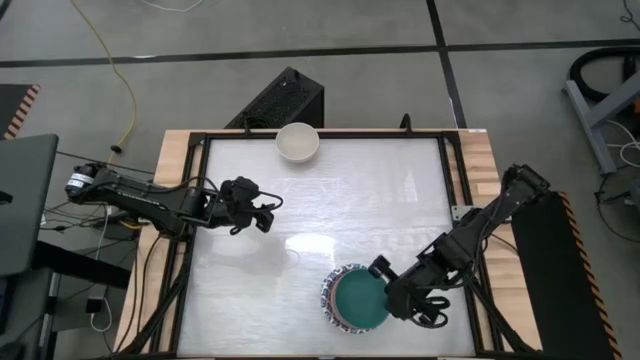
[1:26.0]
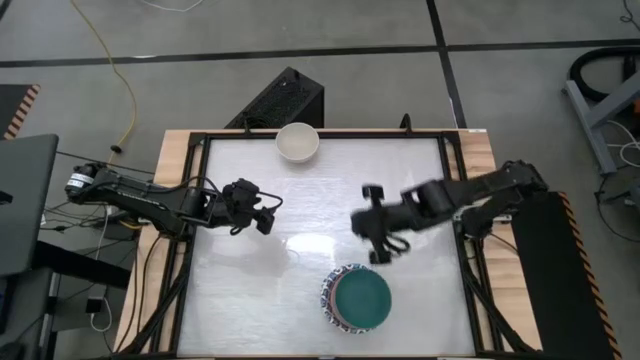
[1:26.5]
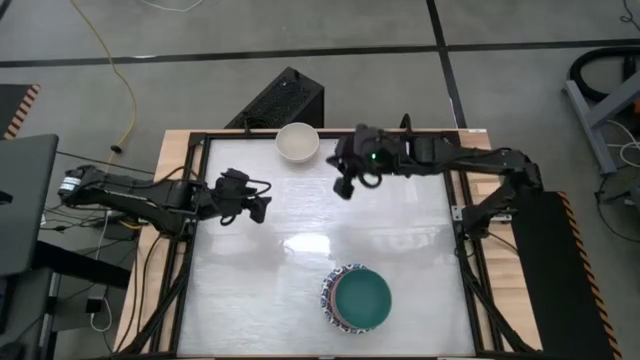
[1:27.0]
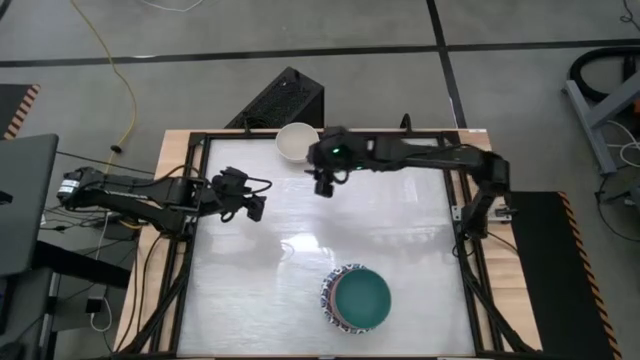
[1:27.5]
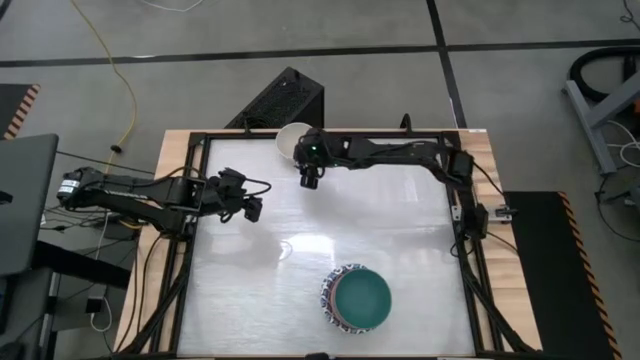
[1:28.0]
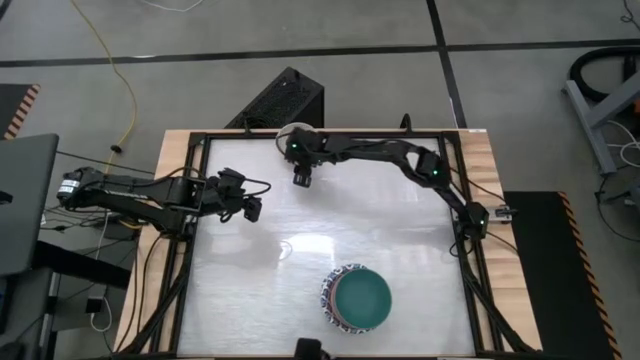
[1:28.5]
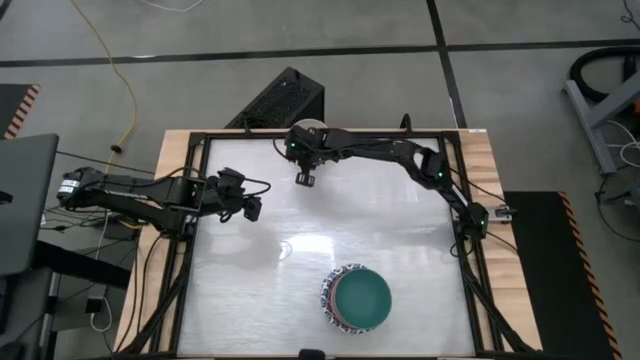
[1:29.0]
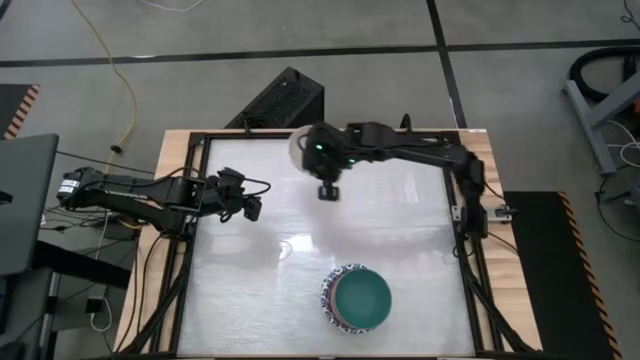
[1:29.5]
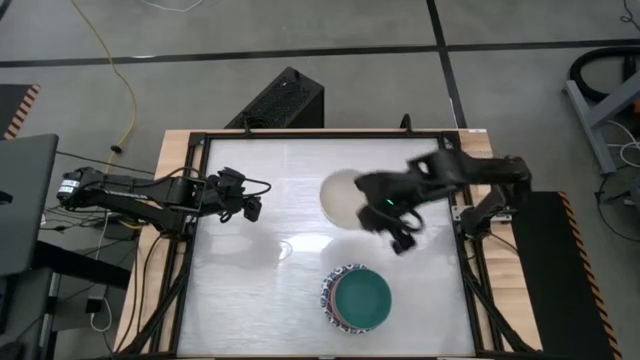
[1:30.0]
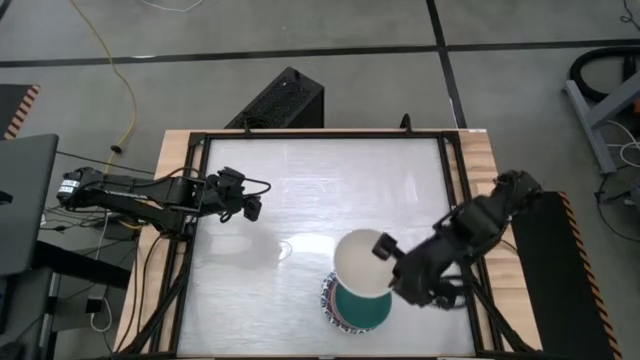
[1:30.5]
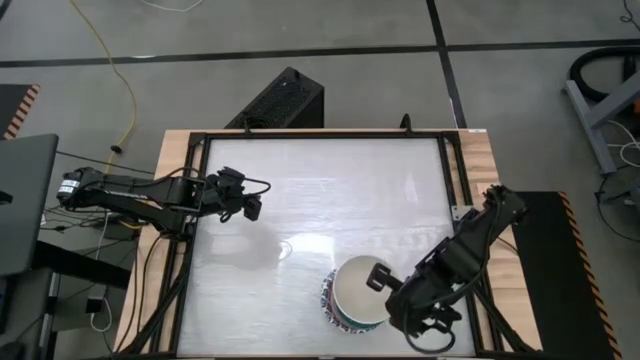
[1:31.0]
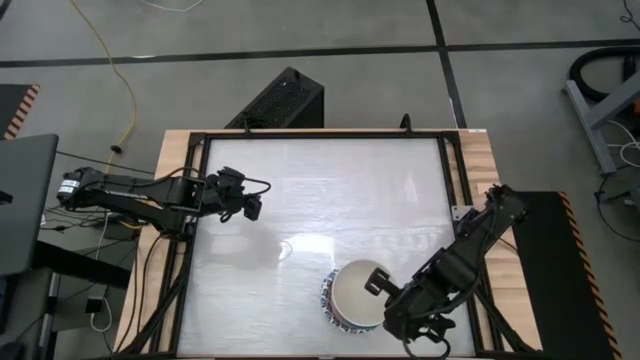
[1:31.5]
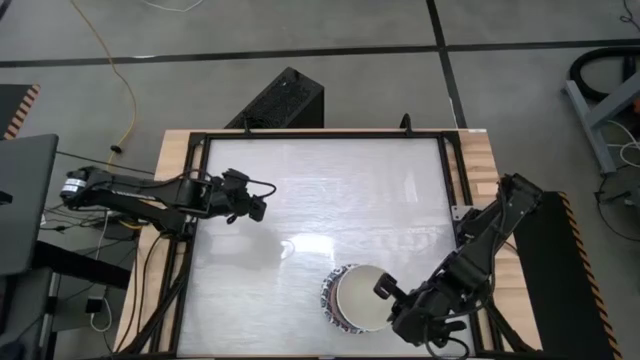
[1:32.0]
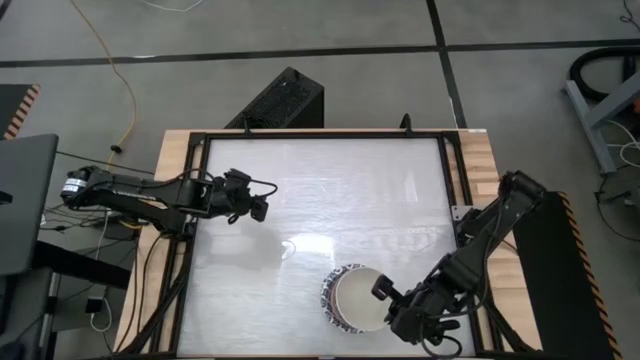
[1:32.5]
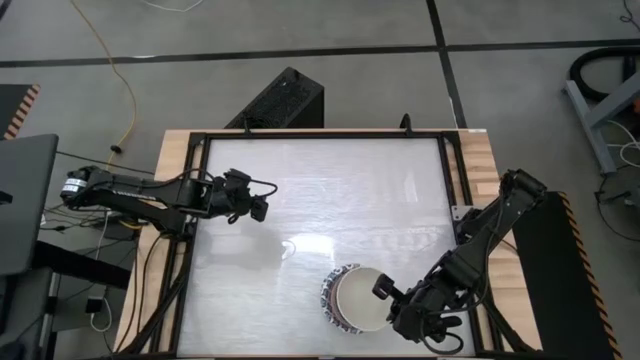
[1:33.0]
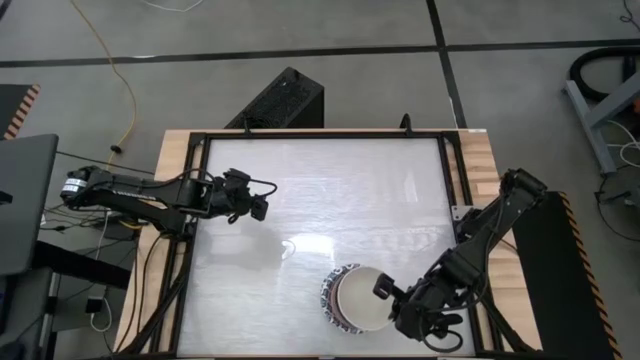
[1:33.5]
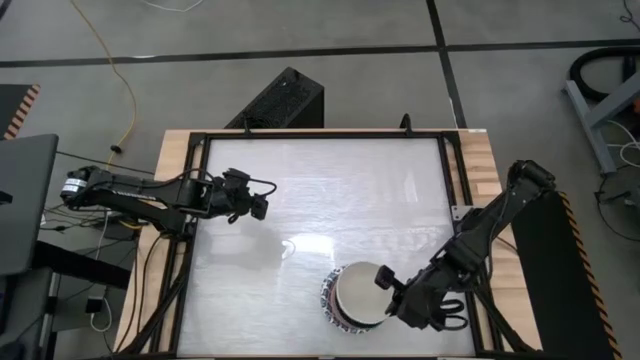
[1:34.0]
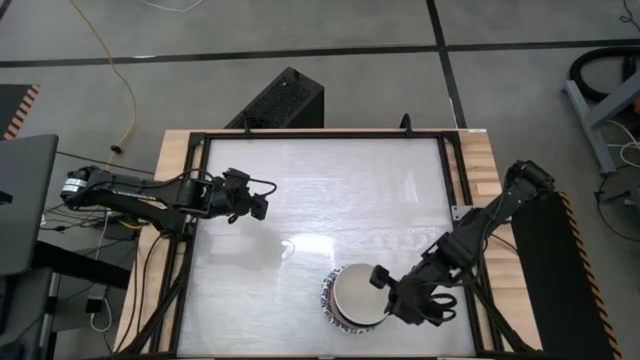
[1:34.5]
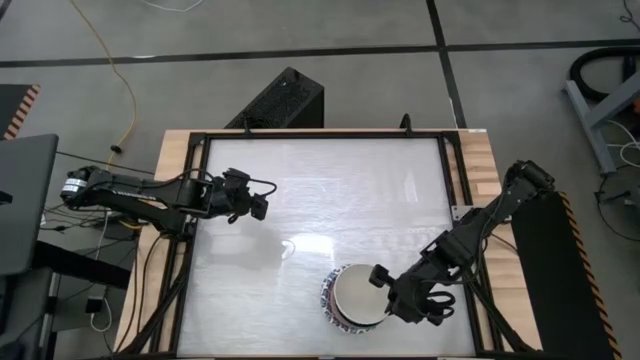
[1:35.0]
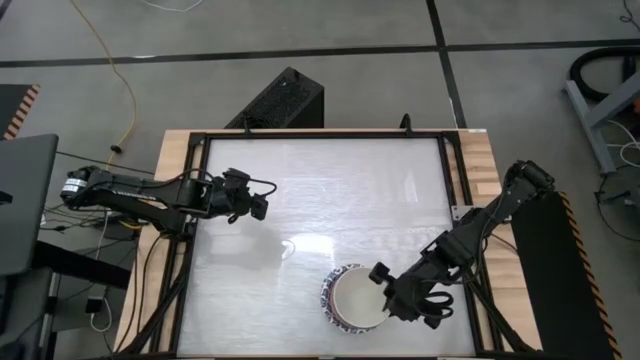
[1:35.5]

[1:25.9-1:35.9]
Stack the white bowl on top of the green bowl

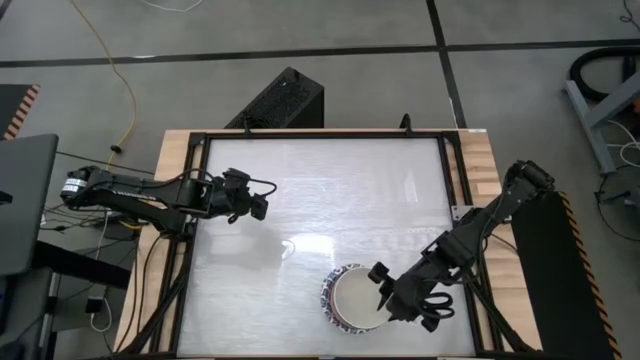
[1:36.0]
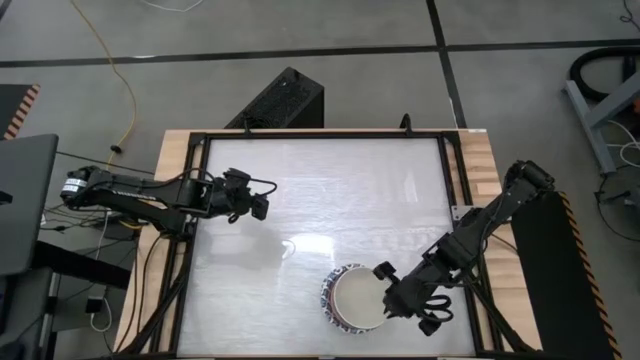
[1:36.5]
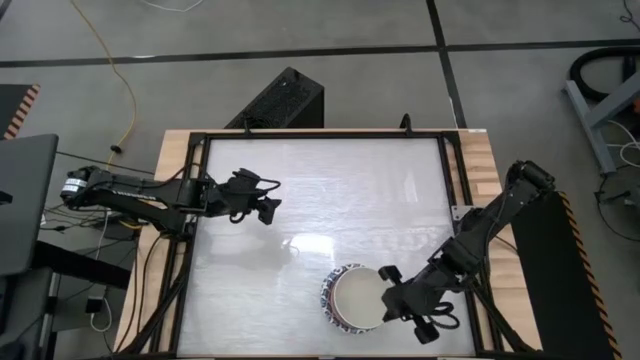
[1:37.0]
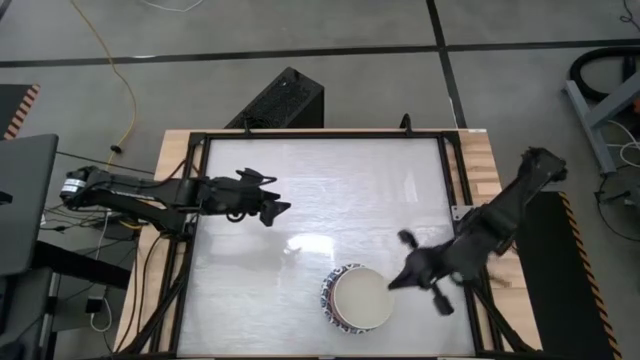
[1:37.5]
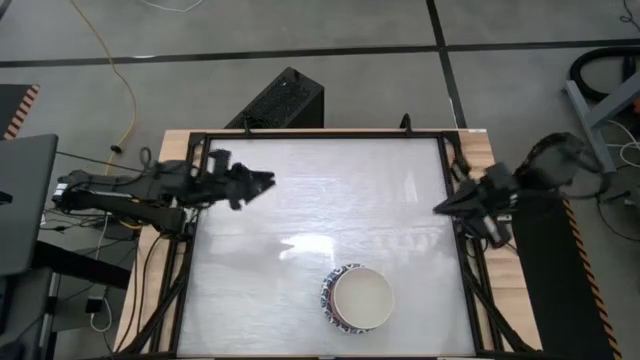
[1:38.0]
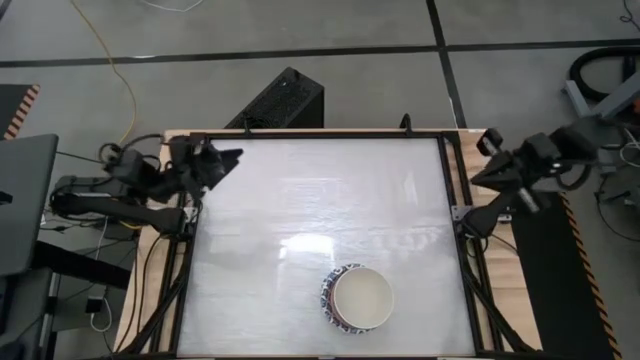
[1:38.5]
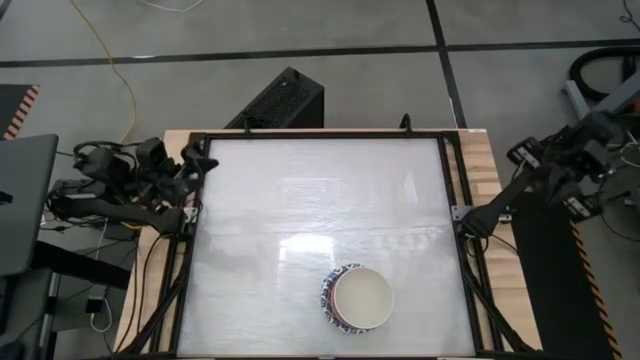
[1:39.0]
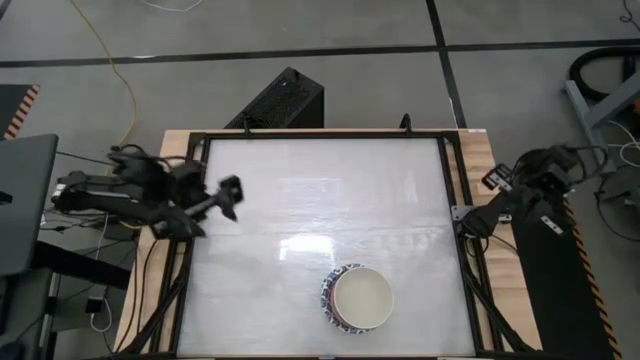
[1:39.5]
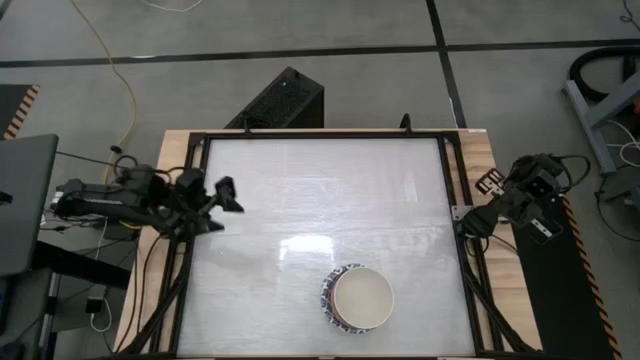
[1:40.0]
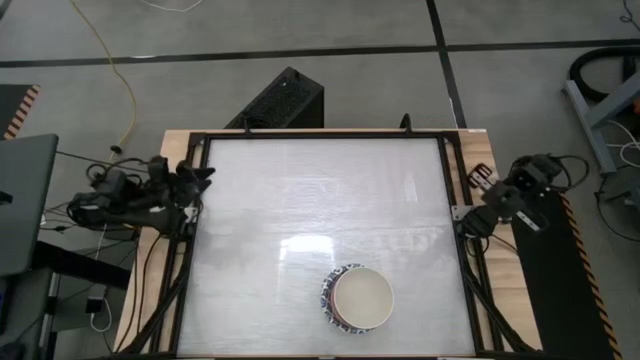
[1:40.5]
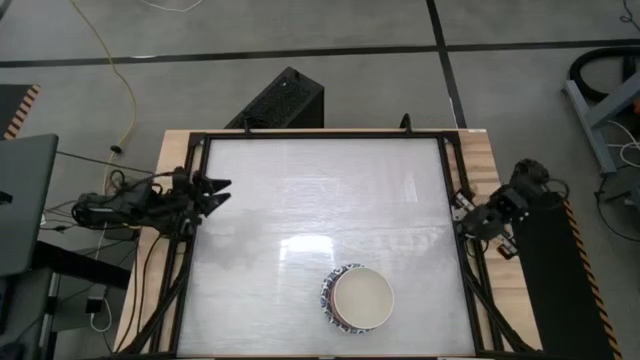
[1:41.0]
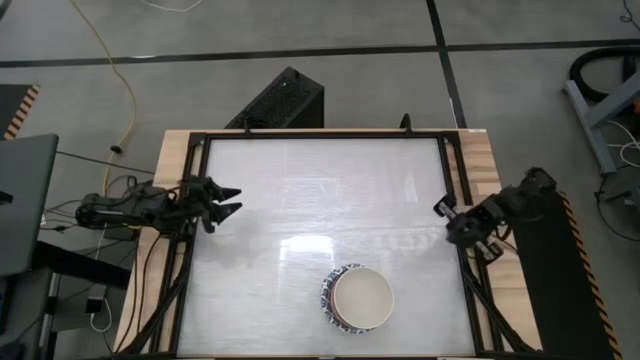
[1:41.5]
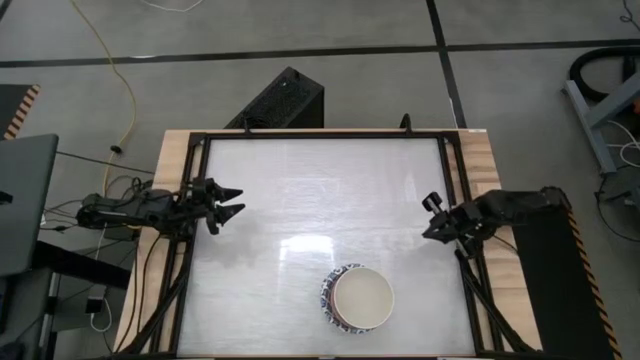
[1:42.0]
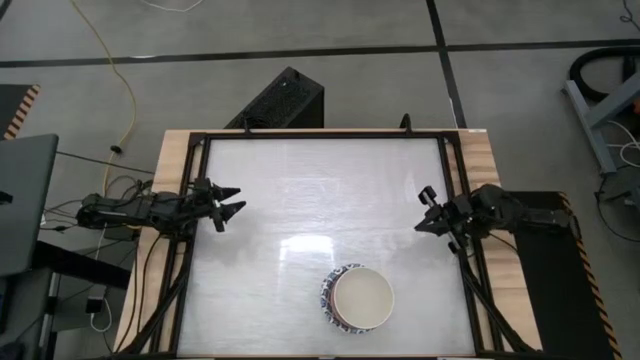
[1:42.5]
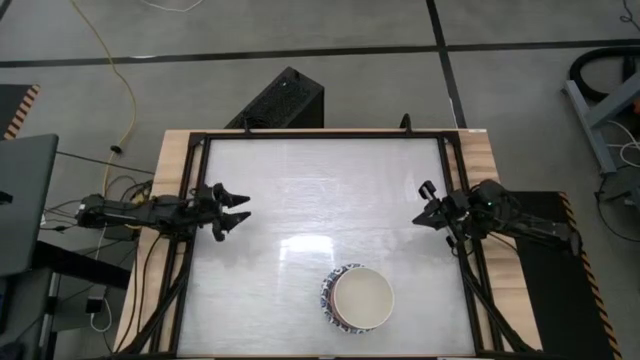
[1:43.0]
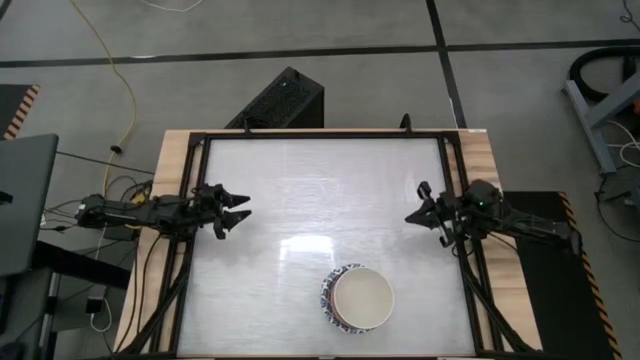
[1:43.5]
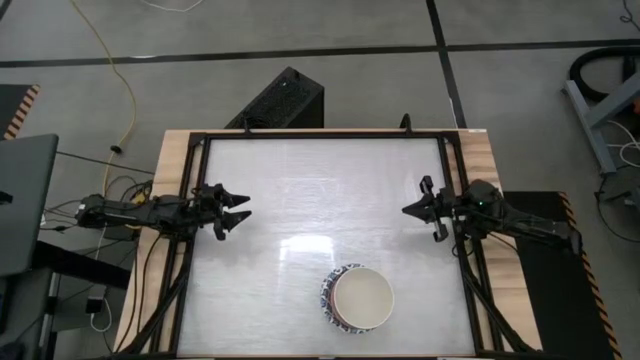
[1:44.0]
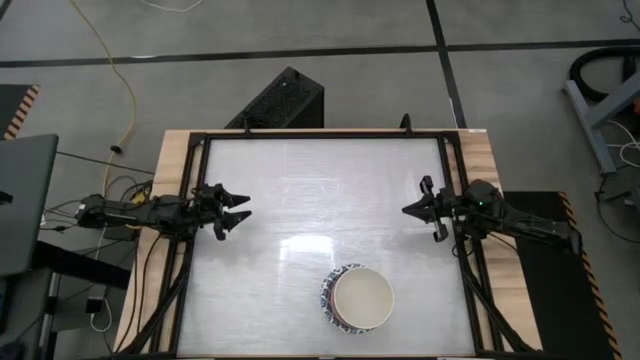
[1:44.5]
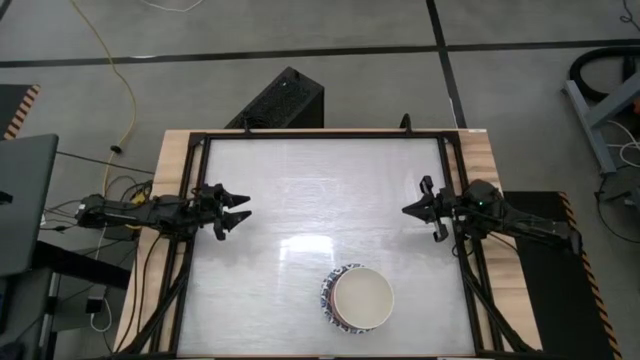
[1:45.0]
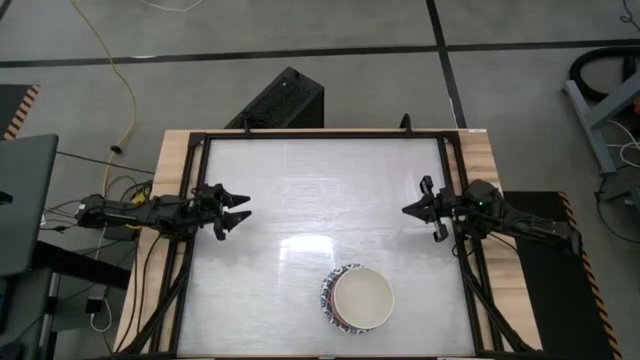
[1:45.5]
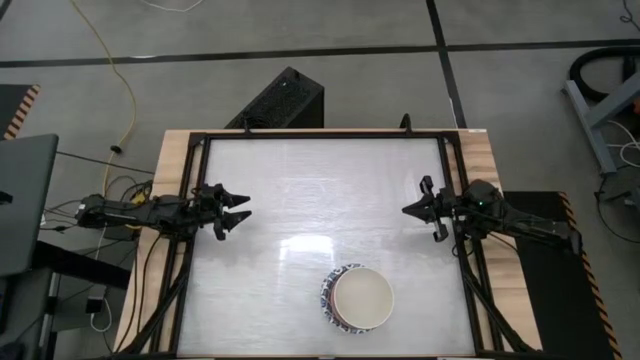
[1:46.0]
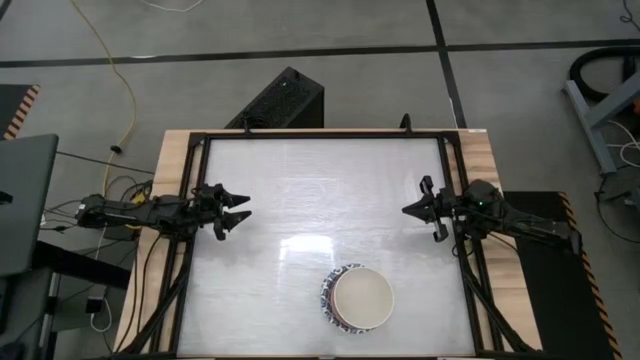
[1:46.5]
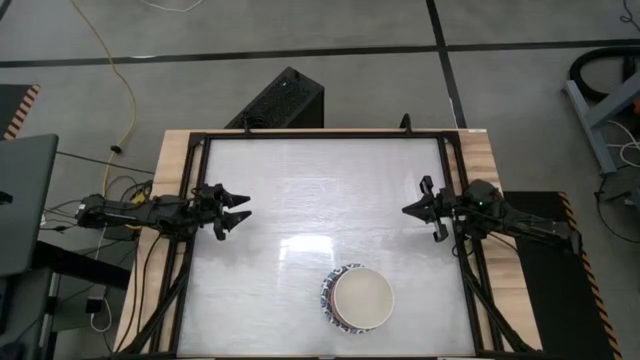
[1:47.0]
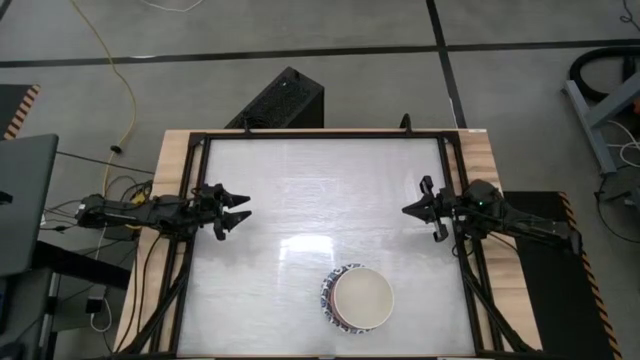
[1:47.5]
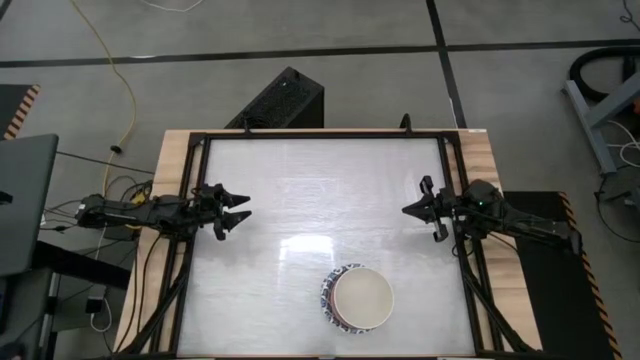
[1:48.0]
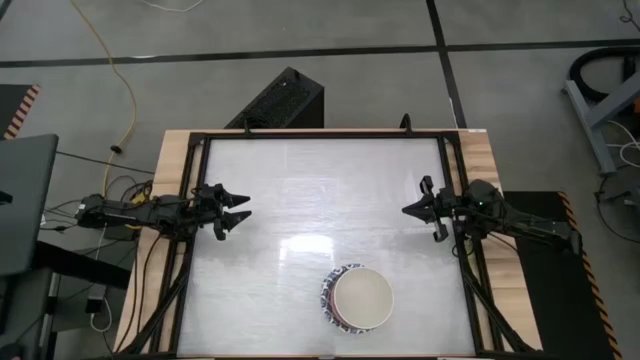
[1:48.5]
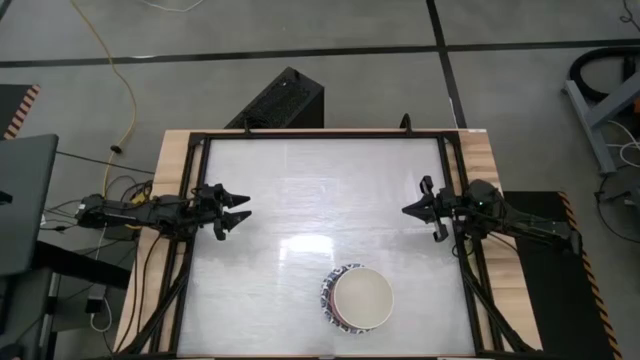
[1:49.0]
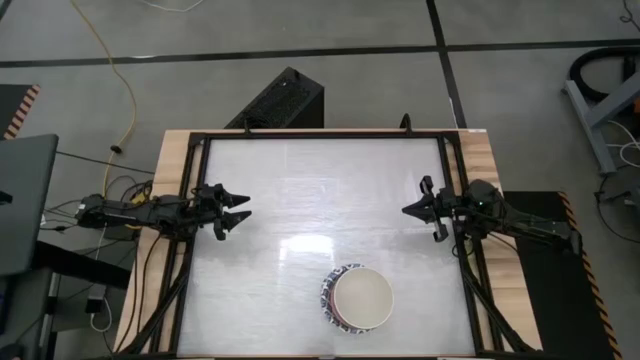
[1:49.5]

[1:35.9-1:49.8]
Return to Home Position
